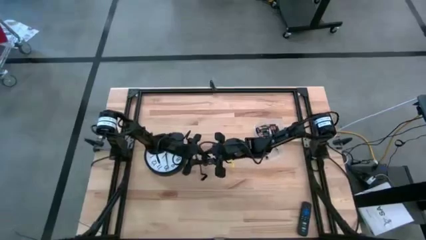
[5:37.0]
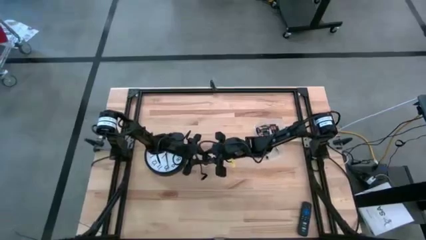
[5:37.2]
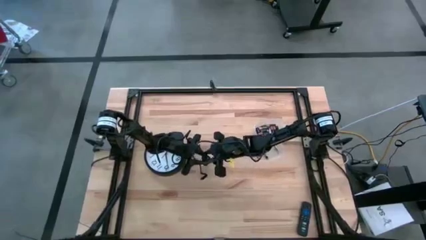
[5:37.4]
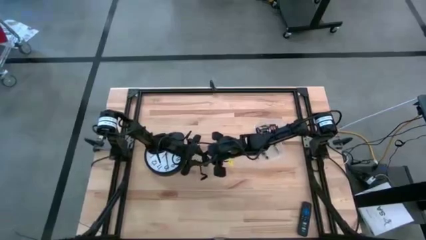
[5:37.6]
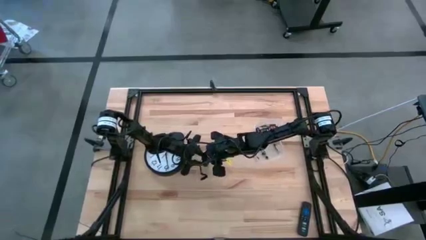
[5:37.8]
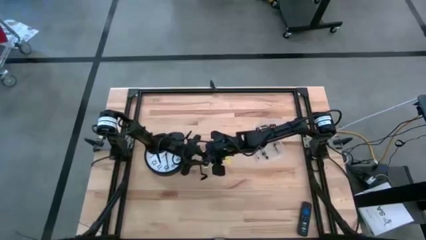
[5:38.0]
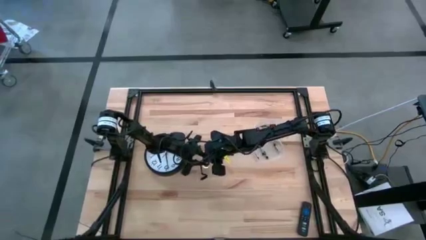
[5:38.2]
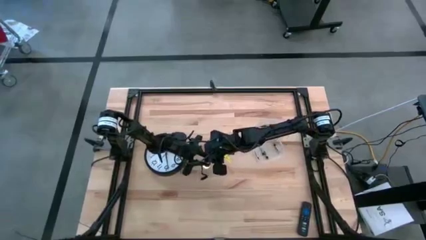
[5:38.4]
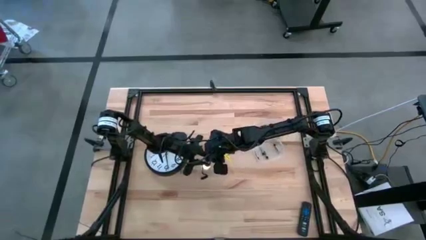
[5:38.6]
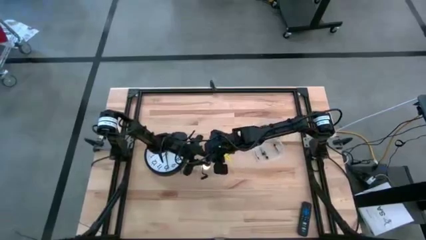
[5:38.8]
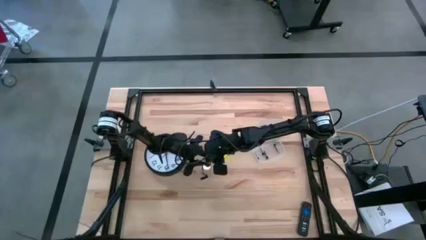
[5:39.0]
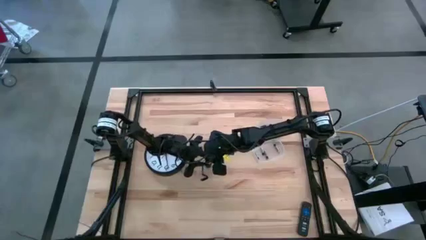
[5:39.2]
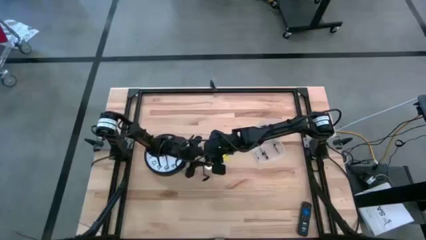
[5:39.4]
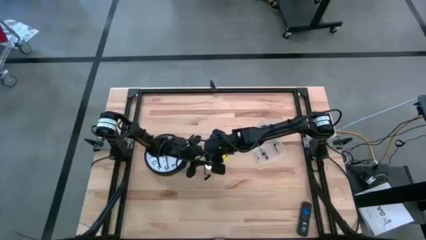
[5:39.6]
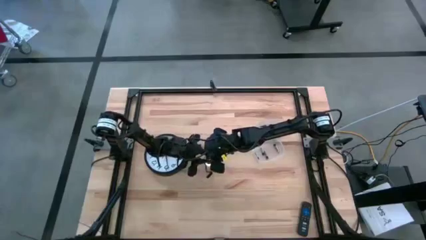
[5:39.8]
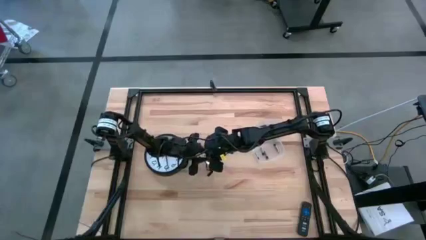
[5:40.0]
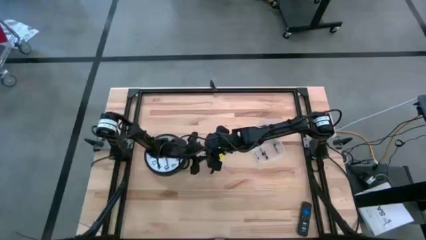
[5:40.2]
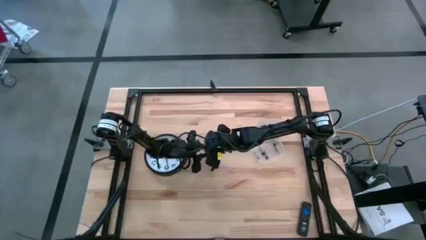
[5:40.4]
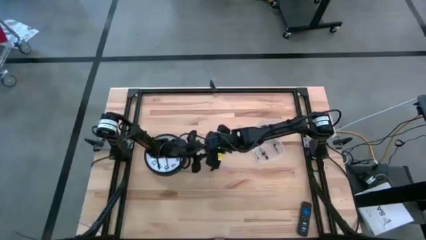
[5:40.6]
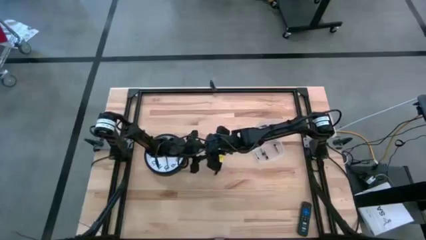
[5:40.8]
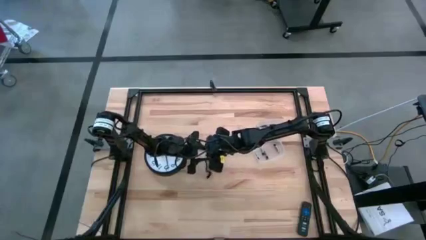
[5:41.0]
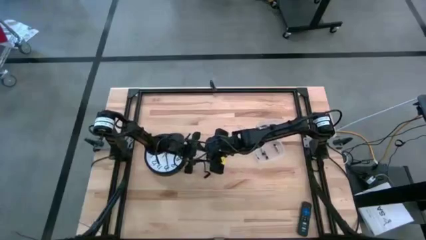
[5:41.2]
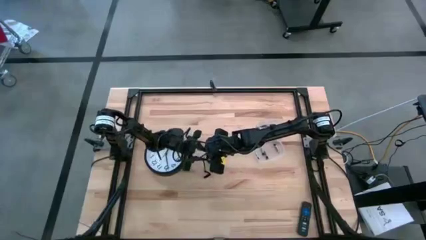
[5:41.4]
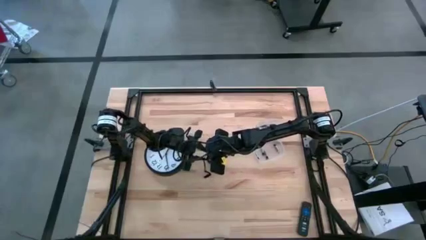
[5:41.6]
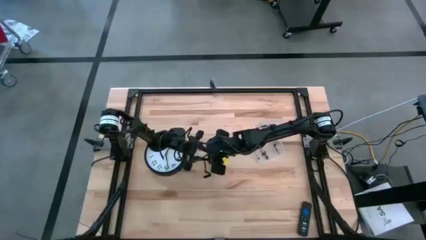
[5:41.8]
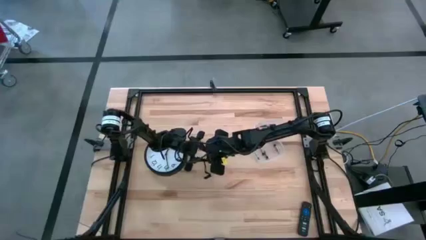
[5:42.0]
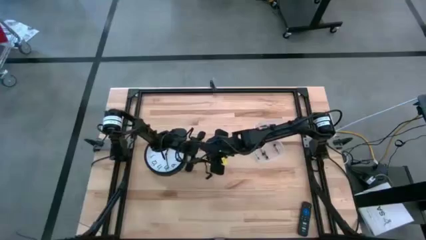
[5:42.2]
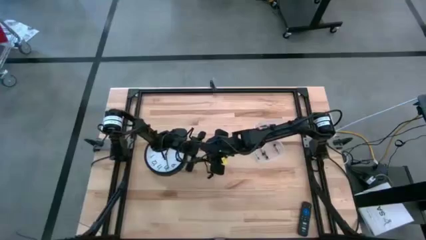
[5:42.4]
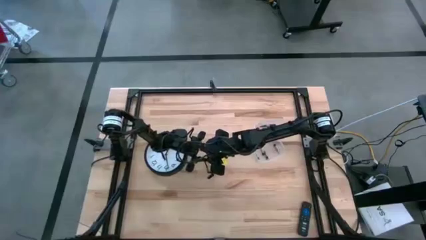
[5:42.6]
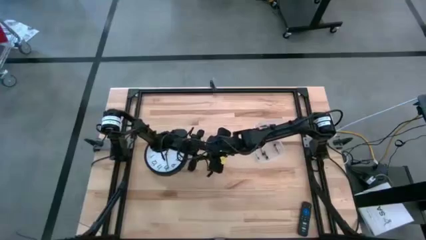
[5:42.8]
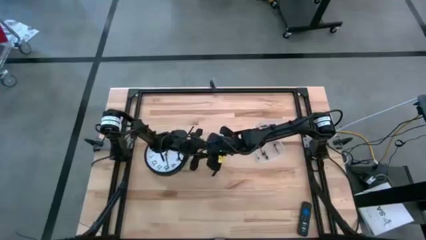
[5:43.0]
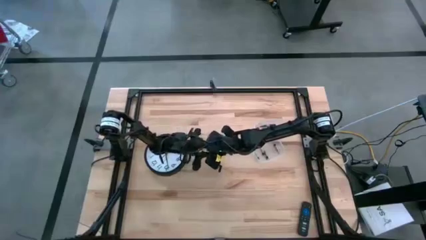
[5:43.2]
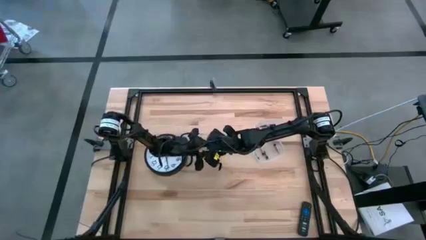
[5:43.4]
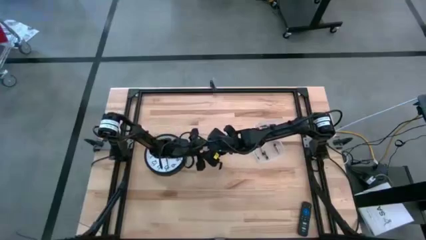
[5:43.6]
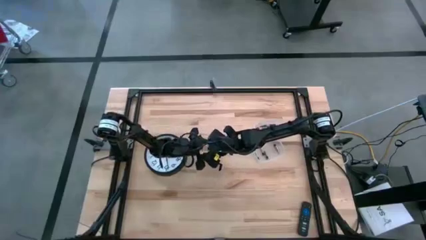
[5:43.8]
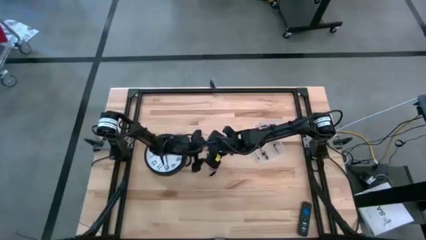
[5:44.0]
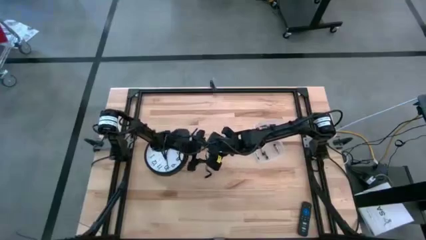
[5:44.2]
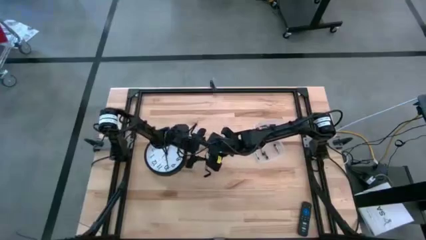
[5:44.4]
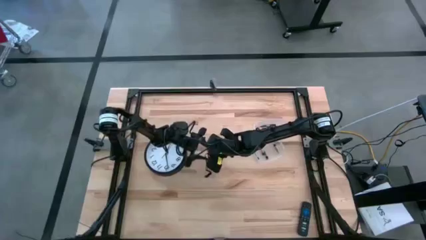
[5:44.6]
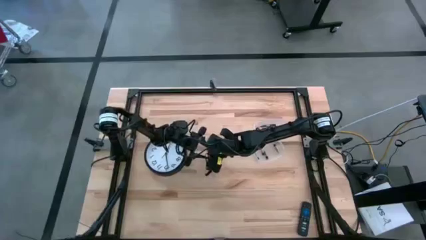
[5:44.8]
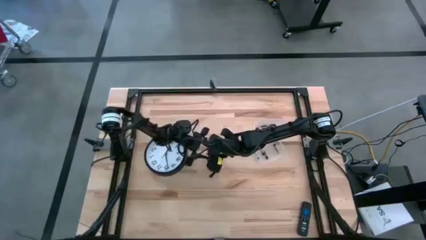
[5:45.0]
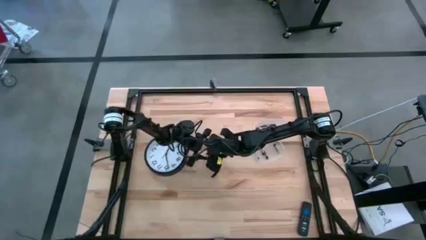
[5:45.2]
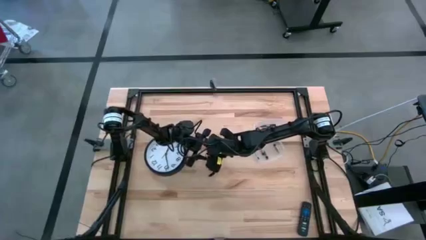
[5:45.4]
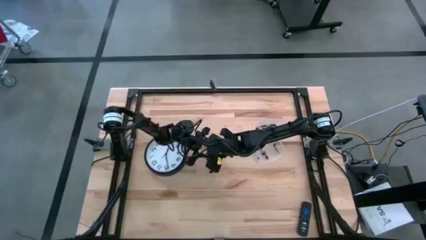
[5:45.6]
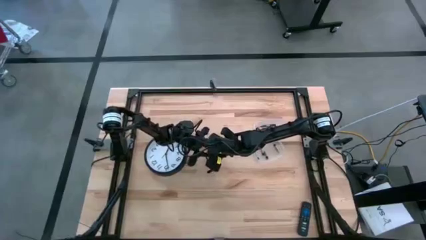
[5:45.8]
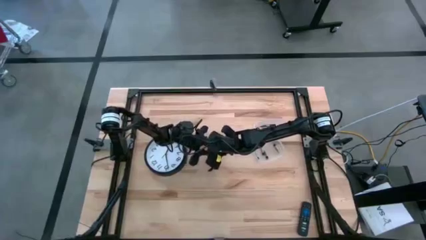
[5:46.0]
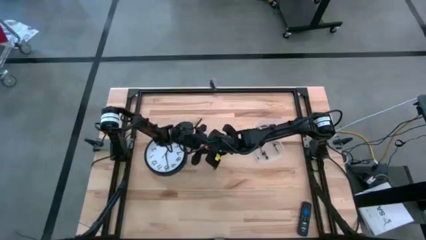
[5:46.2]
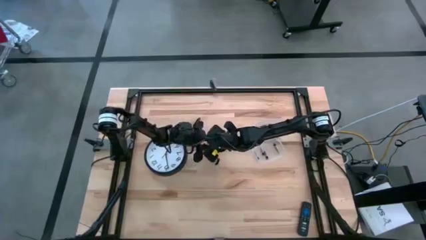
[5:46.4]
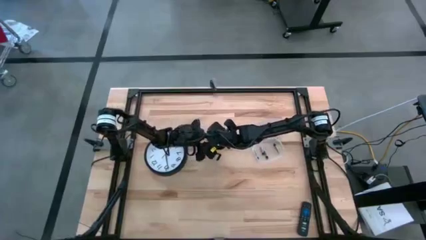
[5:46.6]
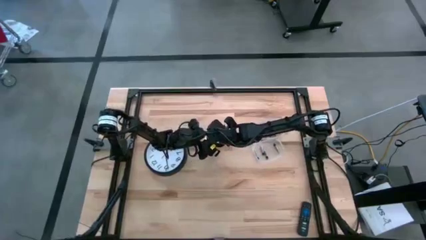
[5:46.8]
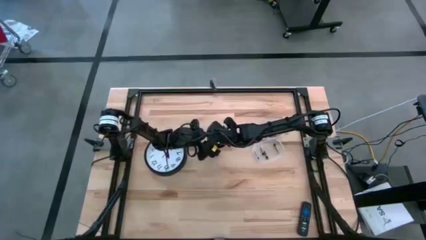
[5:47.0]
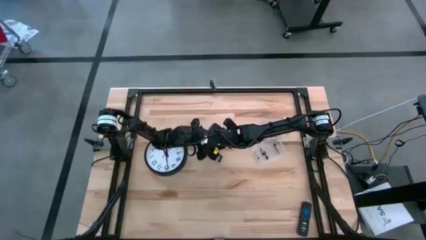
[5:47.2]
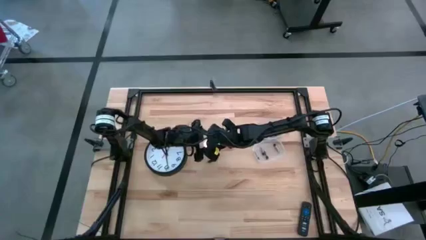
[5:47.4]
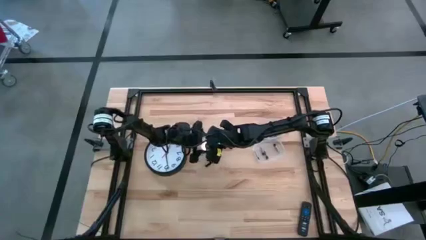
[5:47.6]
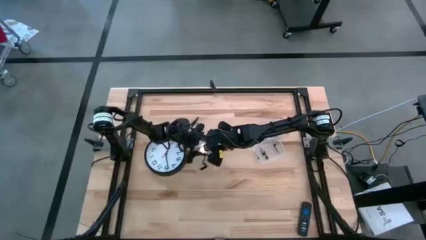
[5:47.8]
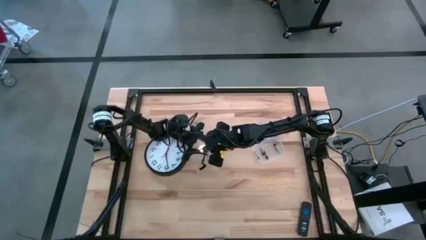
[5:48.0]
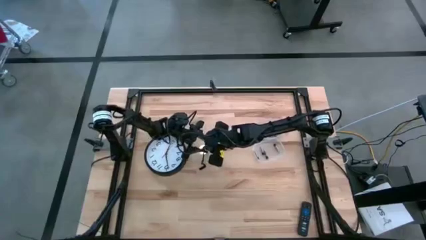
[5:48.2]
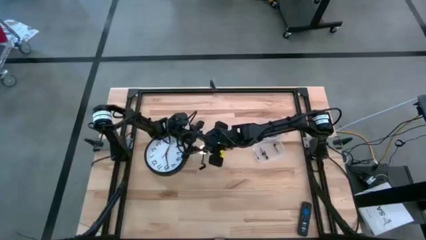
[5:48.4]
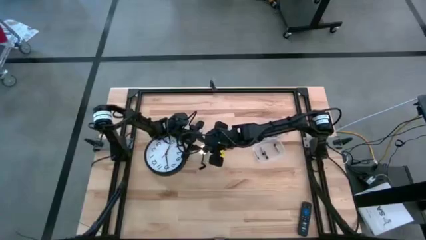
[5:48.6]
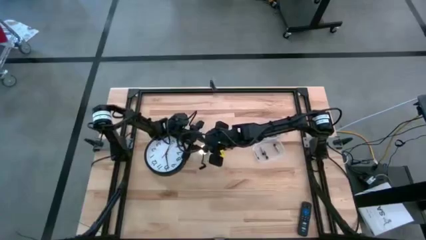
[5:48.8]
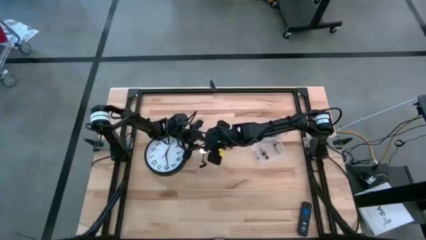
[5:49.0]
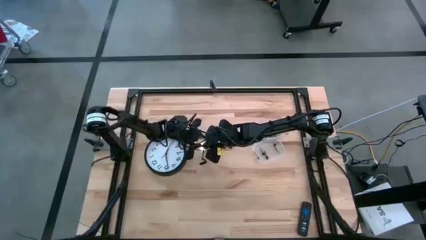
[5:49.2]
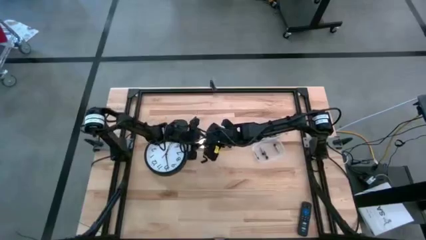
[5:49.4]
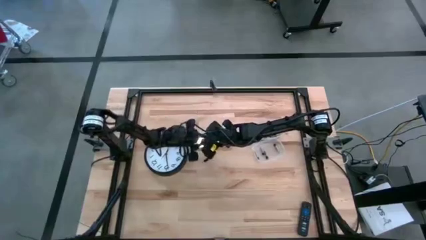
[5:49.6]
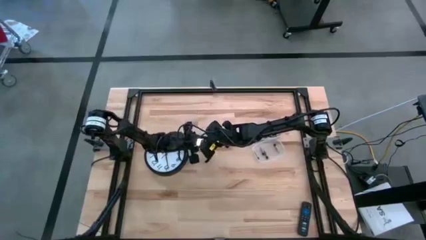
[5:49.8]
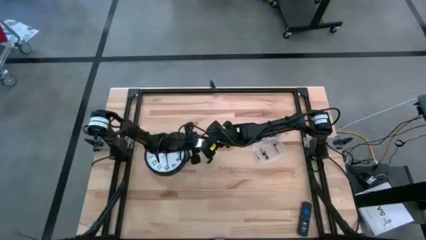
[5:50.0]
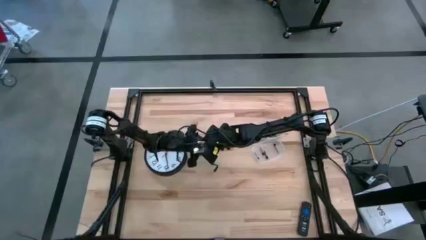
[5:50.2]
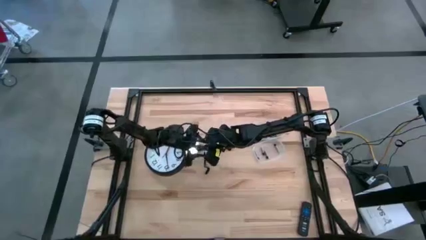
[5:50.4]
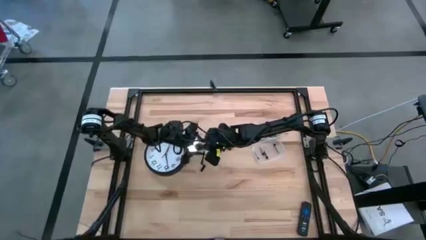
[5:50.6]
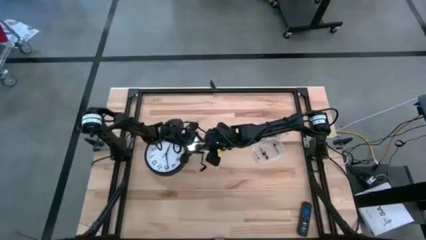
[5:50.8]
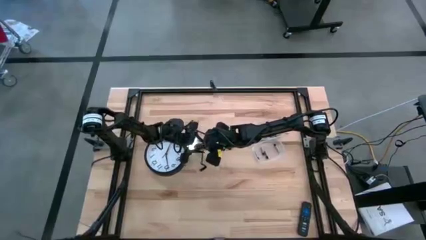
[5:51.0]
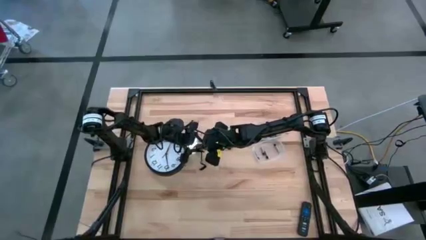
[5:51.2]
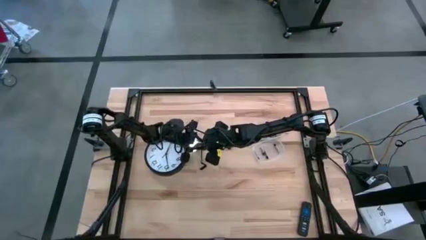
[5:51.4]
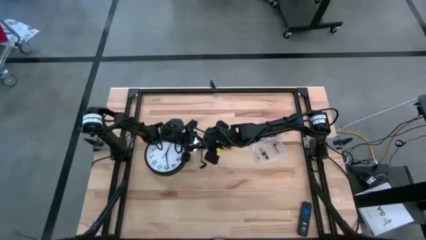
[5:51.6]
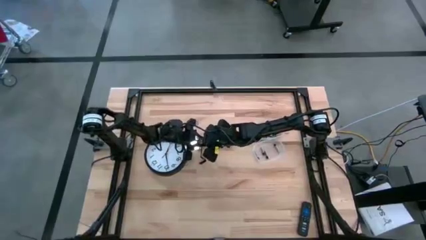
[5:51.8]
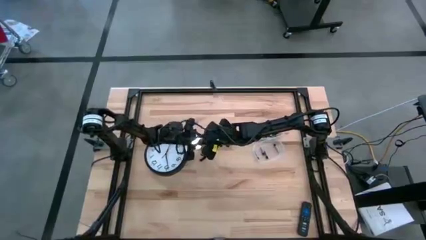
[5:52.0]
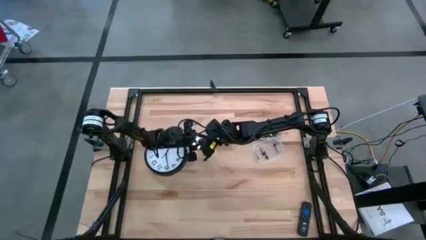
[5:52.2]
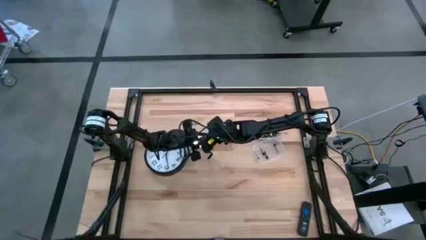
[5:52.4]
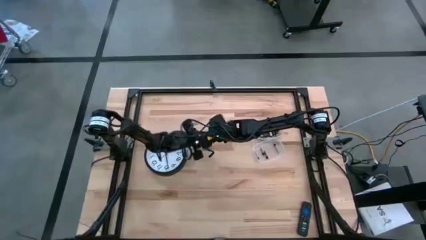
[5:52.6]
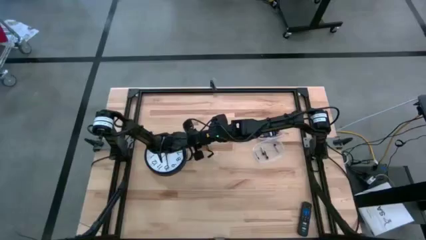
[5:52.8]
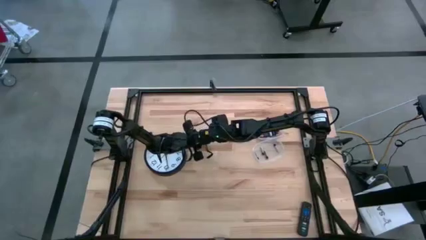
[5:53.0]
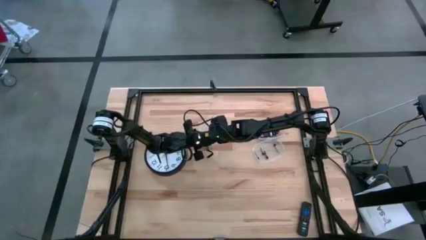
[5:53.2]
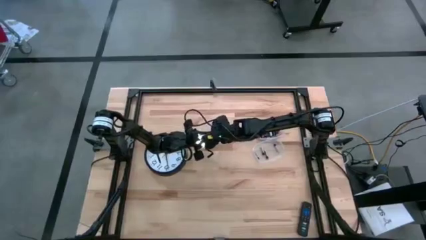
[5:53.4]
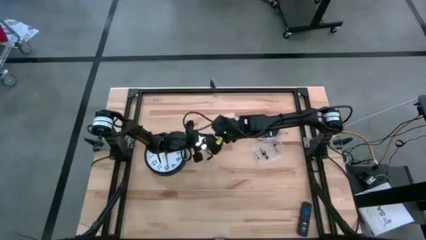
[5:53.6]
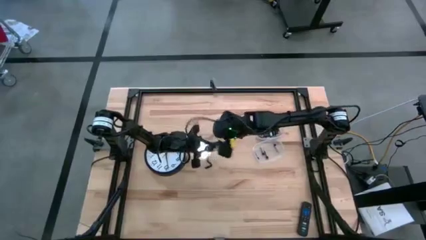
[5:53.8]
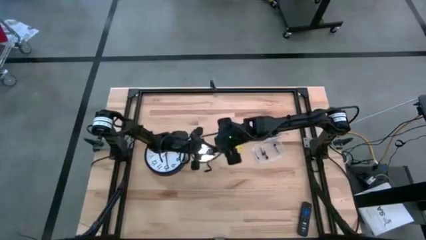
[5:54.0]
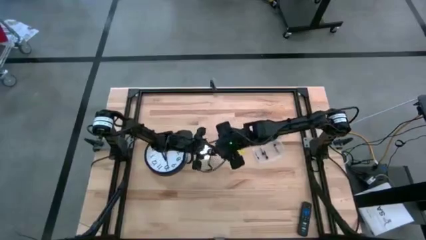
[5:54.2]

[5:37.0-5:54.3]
Task: Insert battery
Close the black battery compartment
